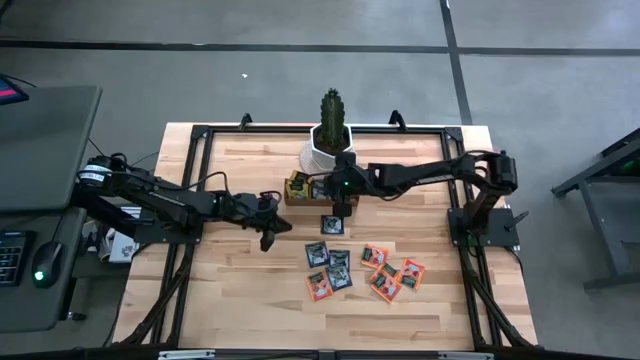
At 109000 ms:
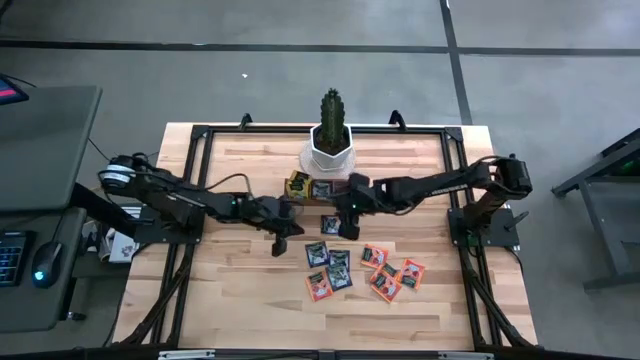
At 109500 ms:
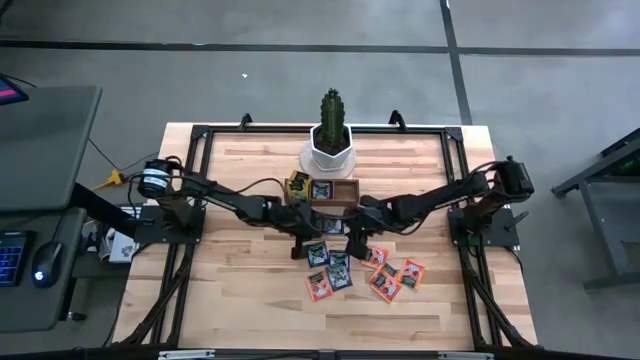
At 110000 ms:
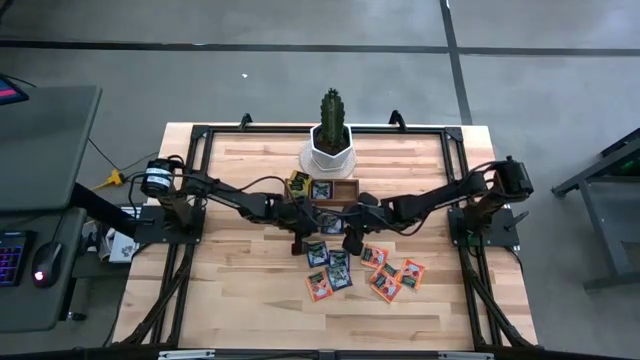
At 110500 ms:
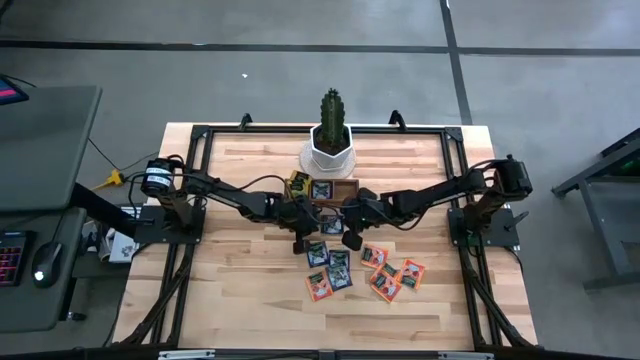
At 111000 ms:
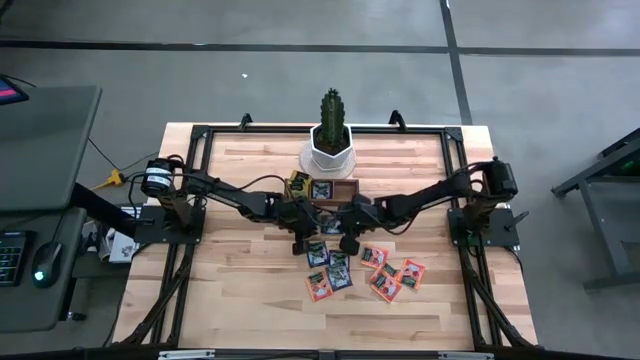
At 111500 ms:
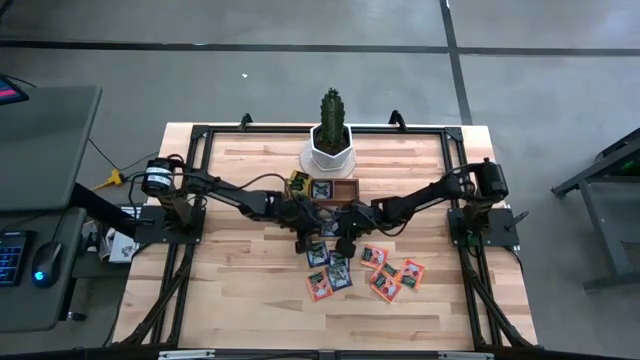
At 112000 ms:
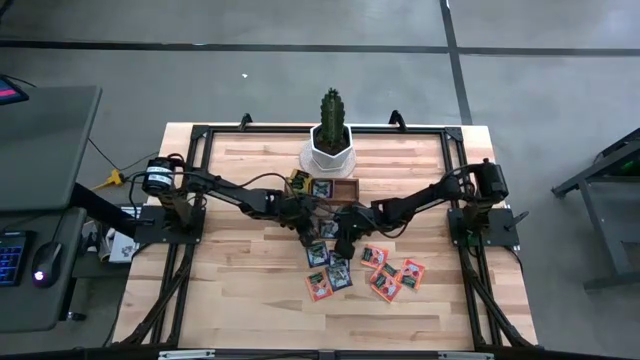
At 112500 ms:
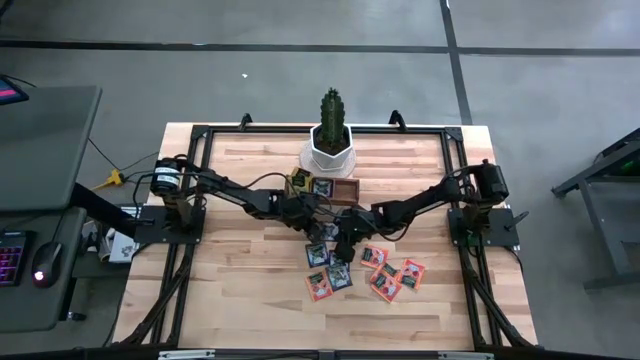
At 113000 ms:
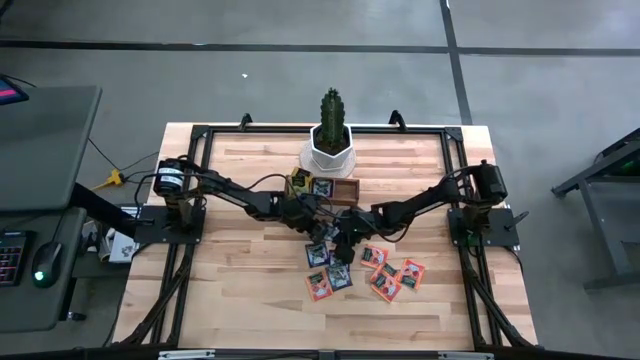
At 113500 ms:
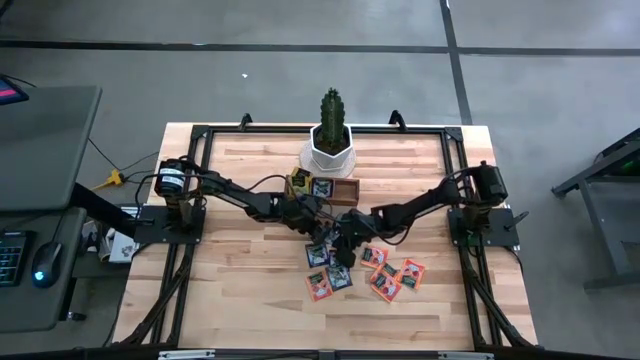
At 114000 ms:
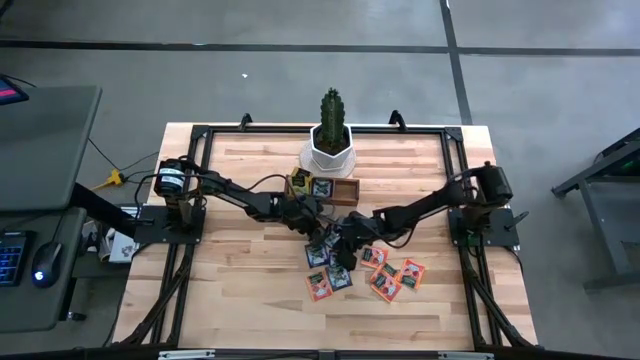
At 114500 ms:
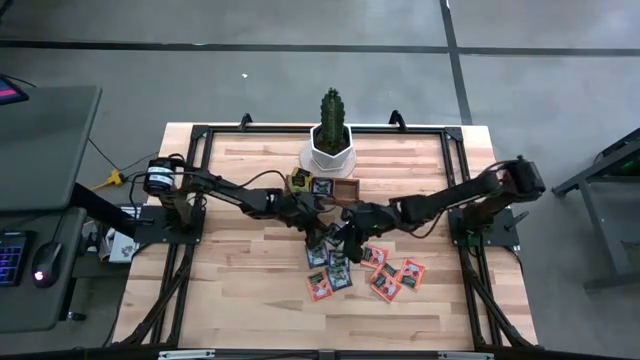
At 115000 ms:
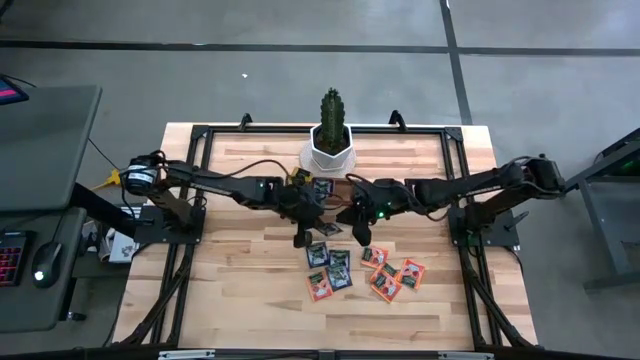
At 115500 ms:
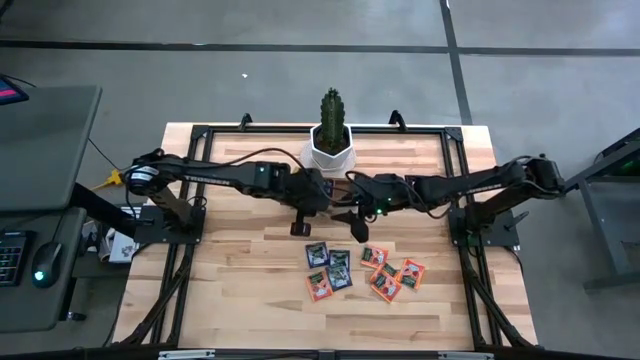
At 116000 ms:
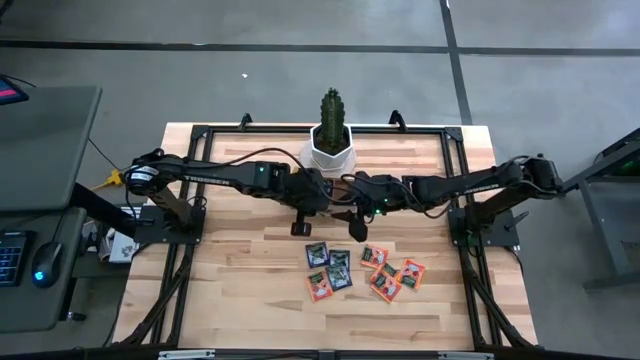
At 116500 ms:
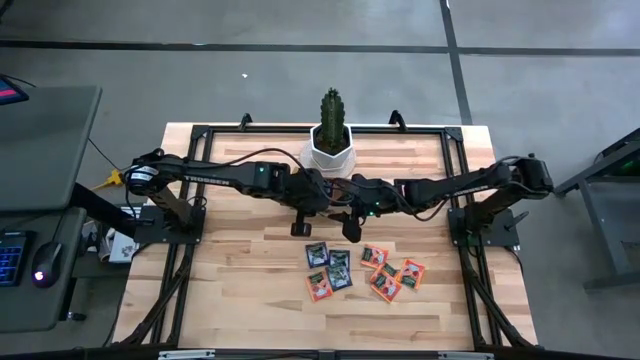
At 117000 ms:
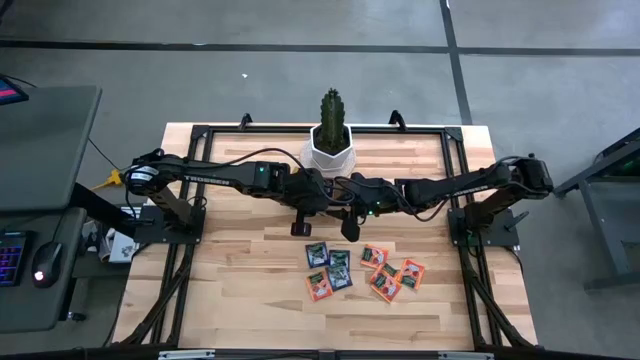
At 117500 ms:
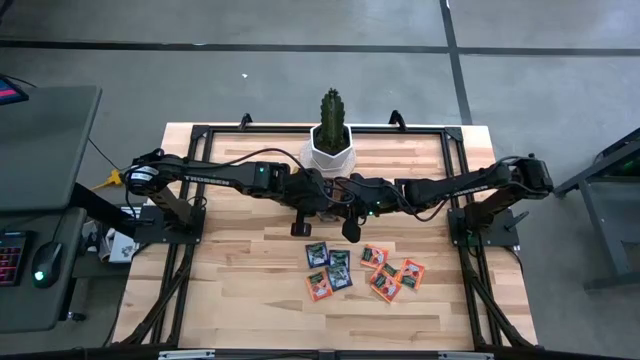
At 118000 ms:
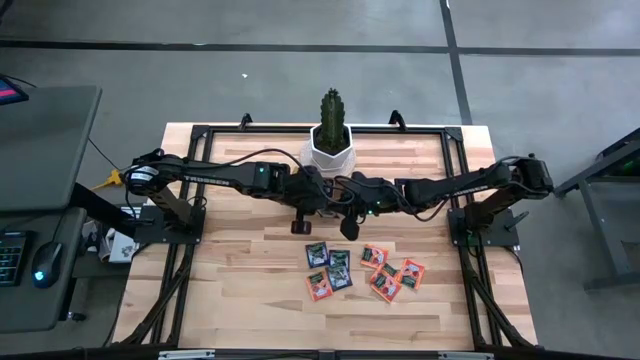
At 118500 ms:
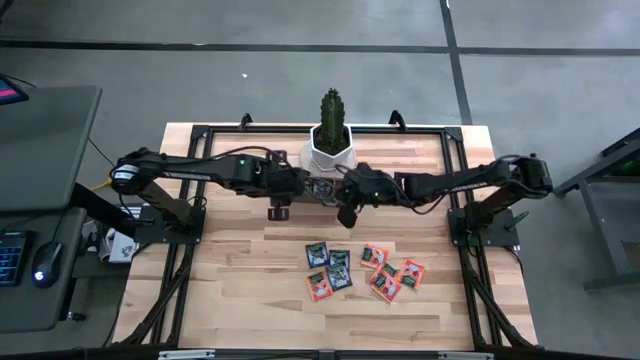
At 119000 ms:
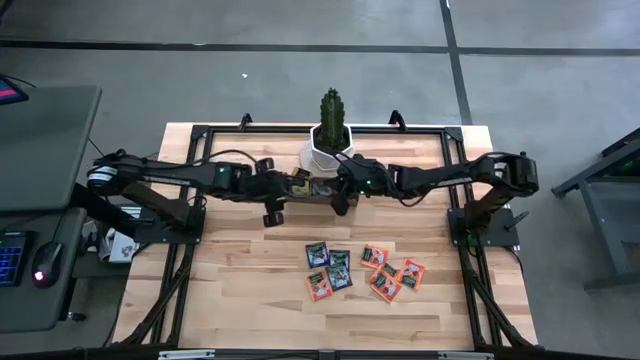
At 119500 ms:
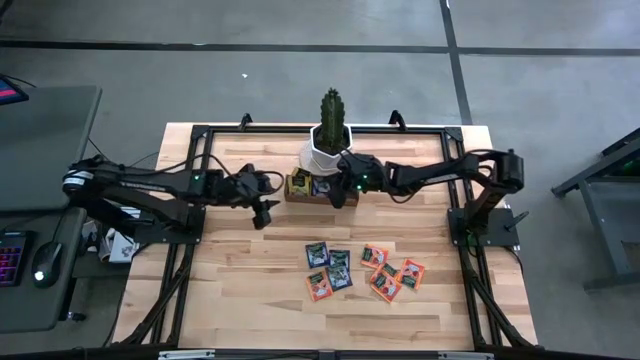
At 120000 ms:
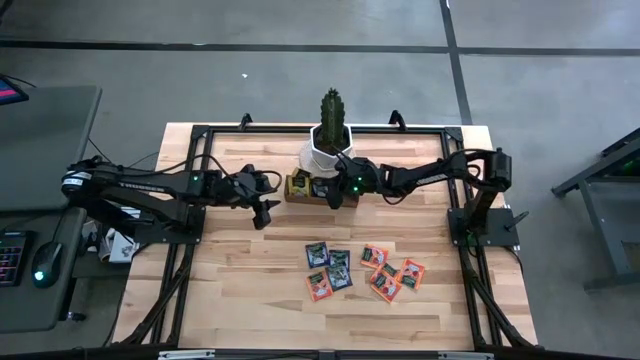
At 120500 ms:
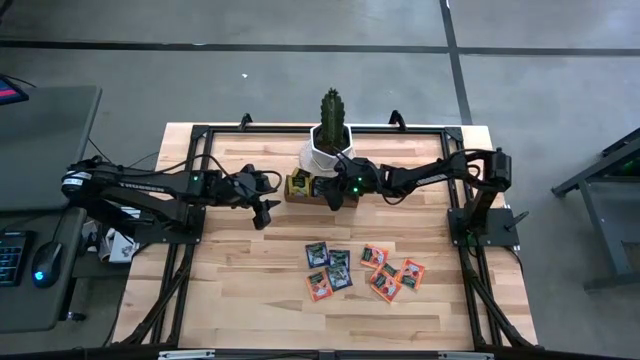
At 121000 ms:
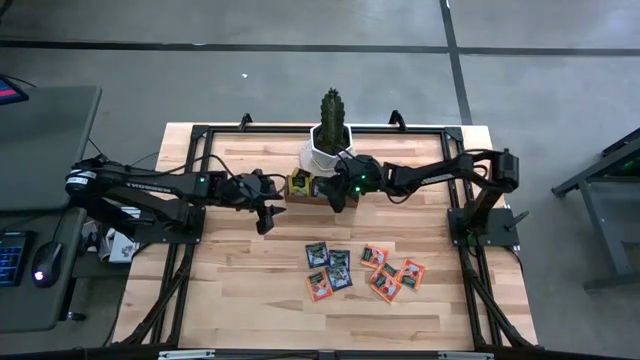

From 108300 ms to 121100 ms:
Task: Pick & Place Tea
Put the purple tea bag into the middle section of the wooden organizer

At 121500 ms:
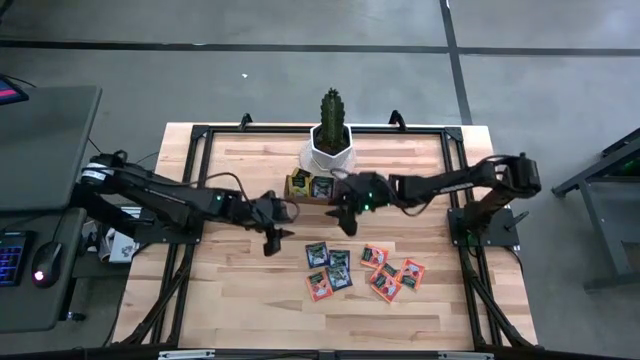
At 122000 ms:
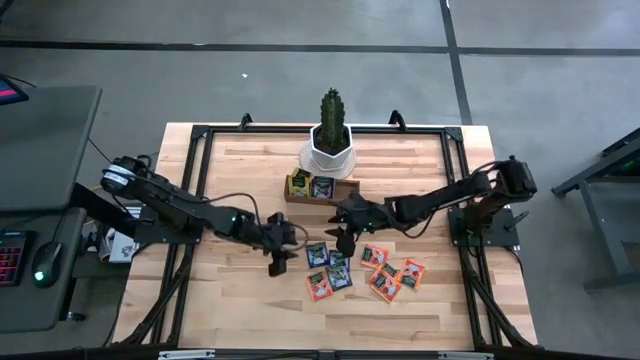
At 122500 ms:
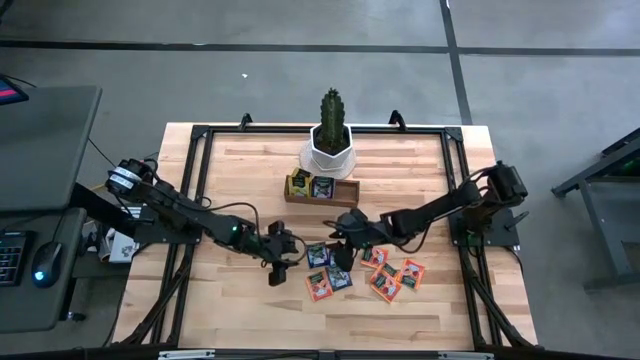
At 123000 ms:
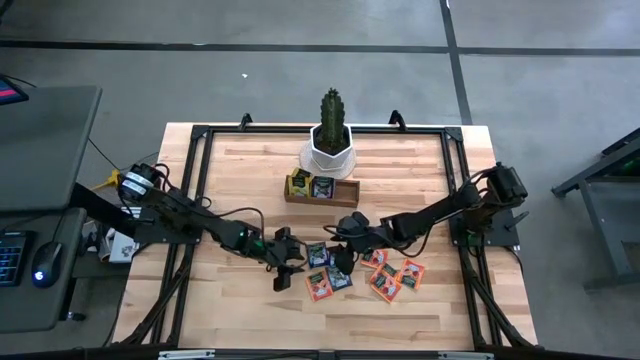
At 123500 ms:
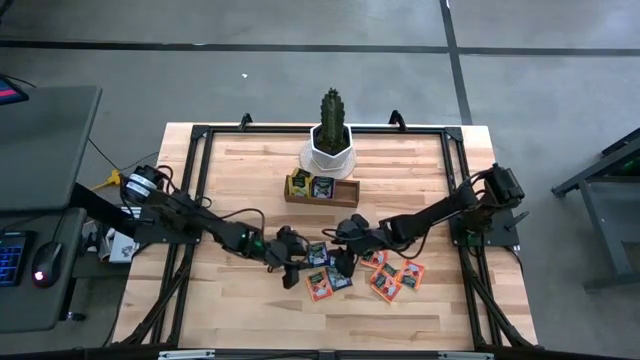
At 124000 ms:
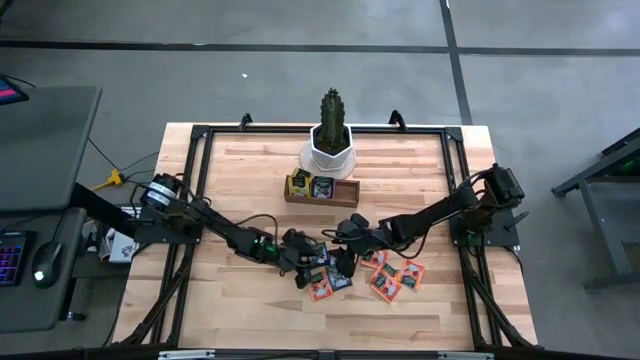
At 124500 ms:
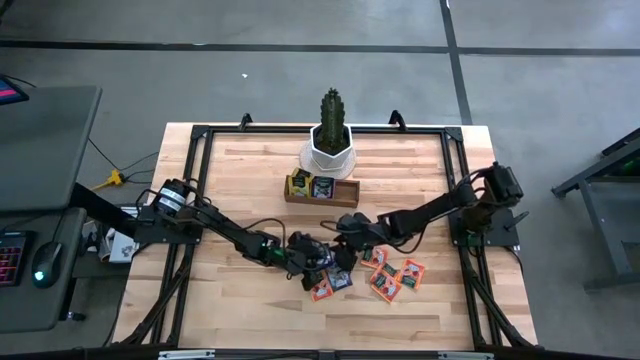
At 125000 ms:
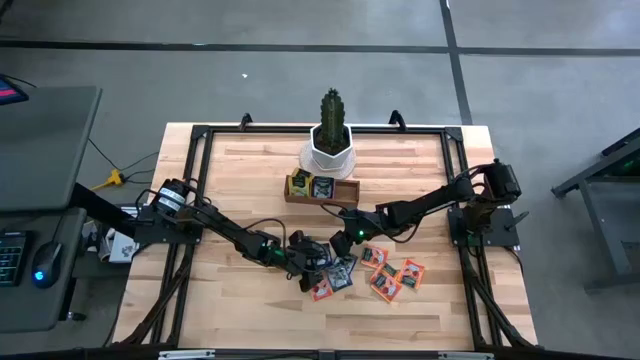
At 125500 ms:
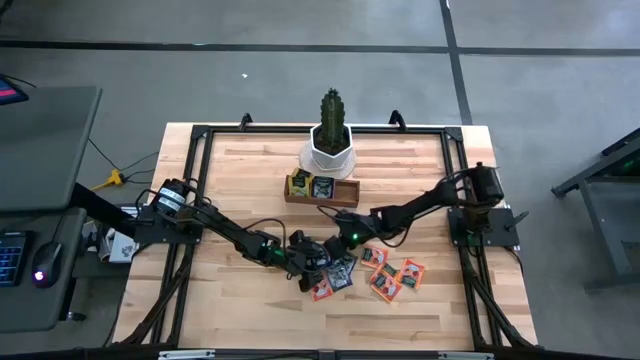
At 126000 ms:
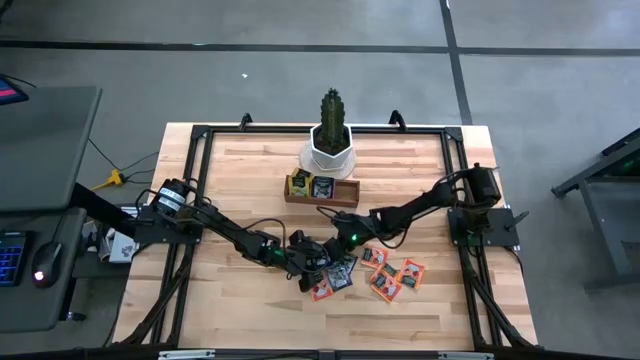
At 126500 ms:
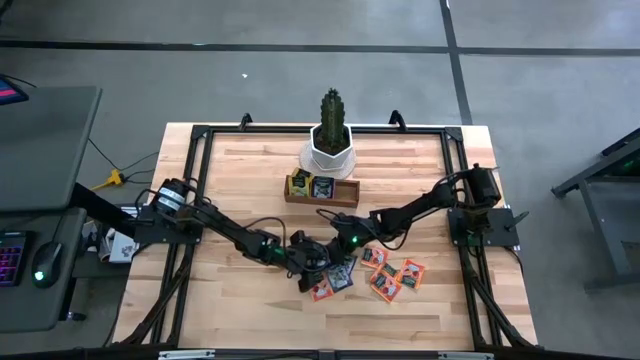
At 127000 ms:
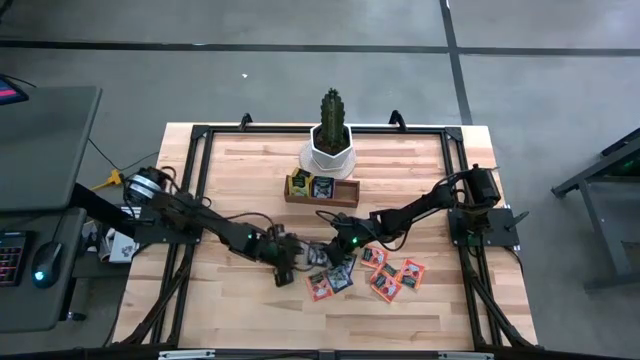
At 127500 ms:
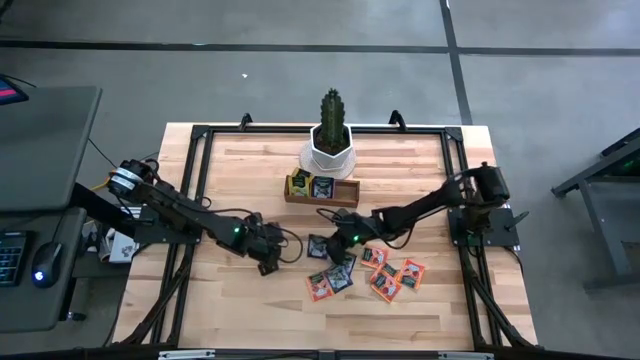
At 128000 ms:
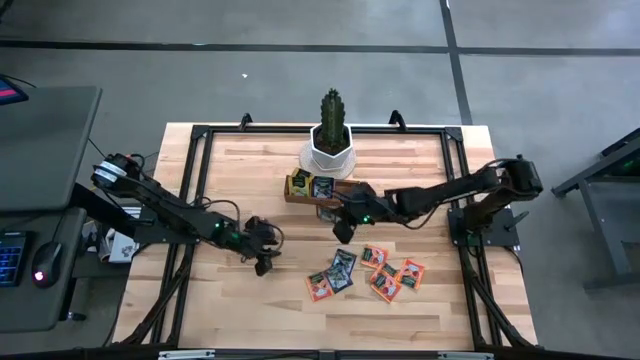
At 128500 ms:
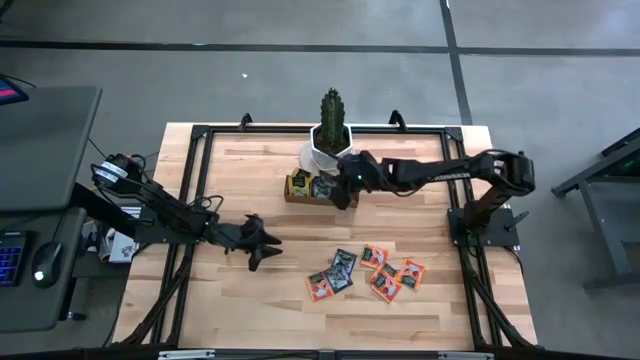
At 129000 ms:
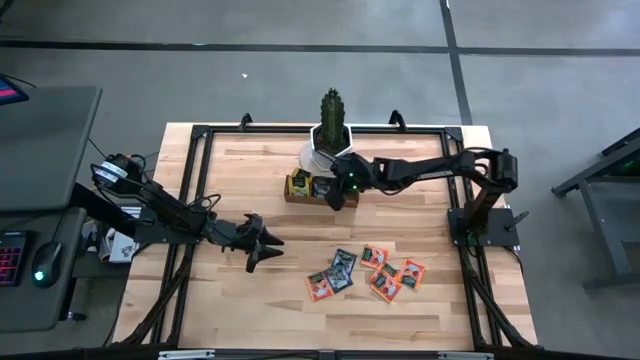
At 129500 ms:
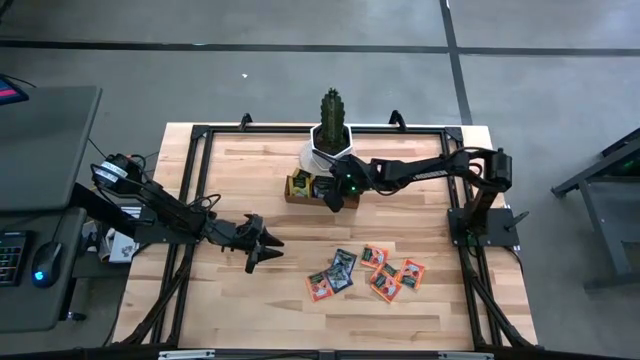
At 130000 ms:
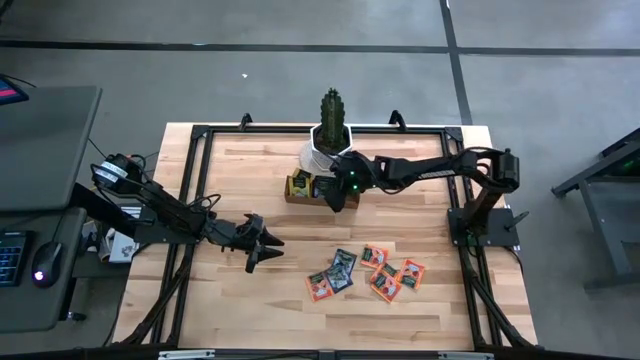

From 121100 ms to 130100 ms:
Put the purple tea bag into the middle section of the wooden organizer
